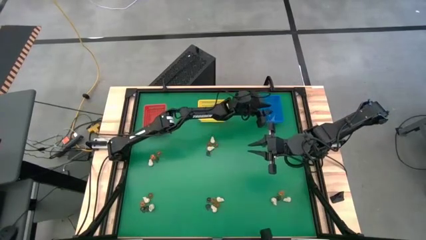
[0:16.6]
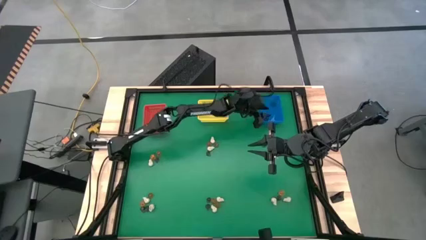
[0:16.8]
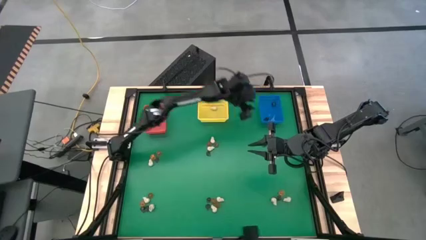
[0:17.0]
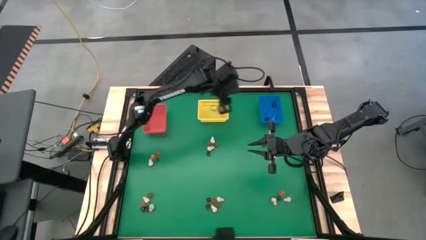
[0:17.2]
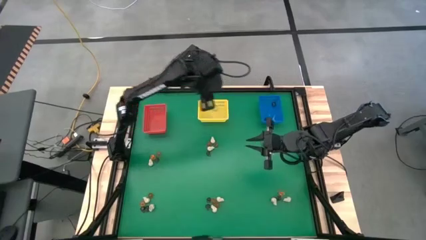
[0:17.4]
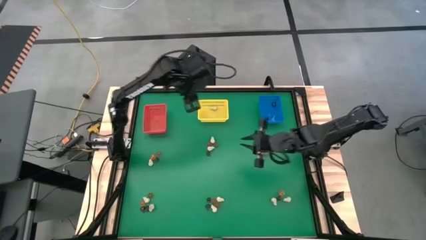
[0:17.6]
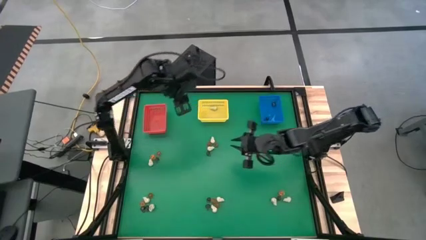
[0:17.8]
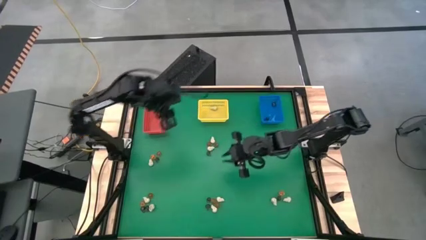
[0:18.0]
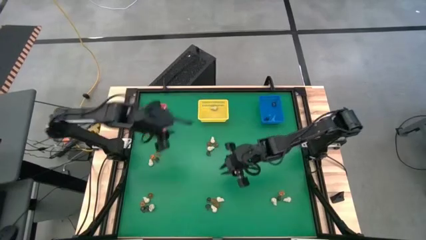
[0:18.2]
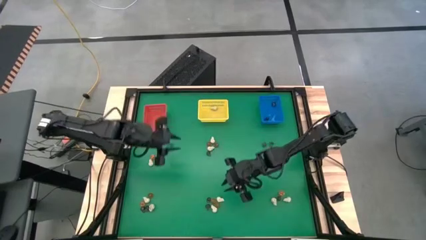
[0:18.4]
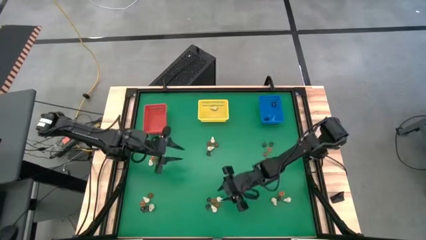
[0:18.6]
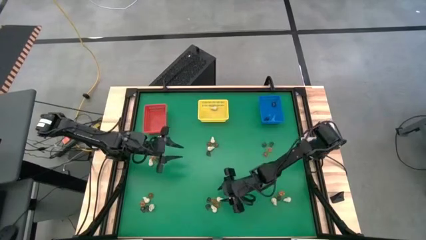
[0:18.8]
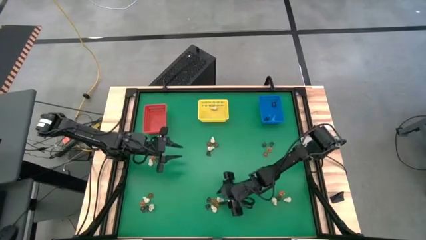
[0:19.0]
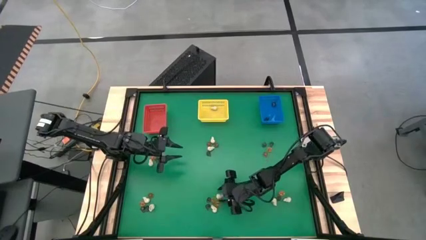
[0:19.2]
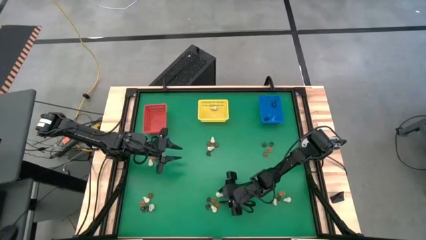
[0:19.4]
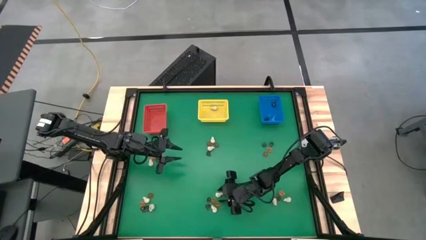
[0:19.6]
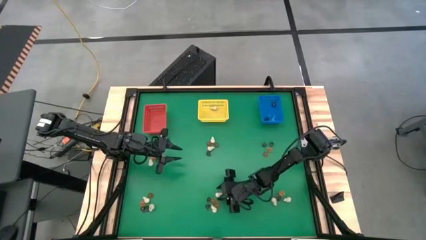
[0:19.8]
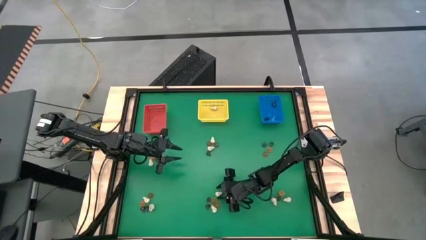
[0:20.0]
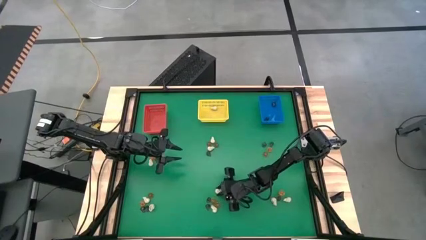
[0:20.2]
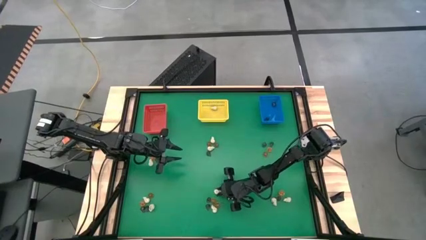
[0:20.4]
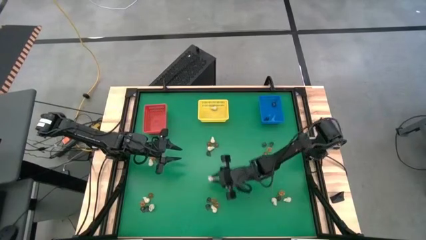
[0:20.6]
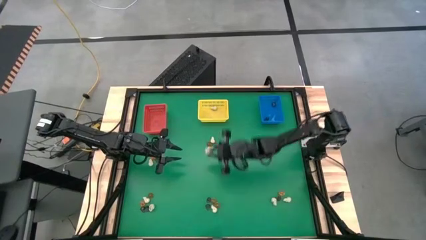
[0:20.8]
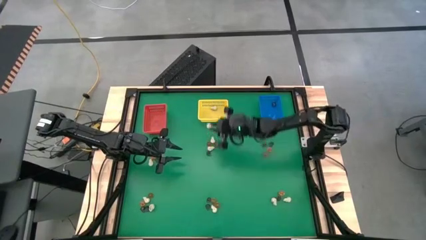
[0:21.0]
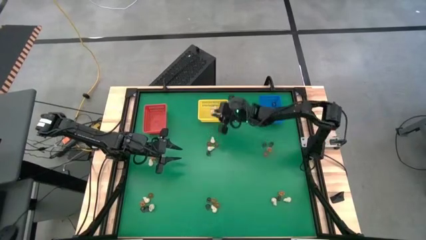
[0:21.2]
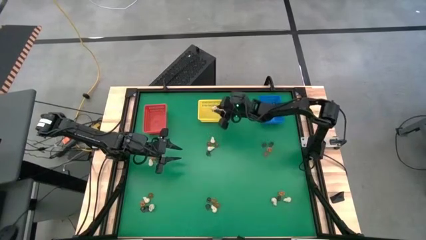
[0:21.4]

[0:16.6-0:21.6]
Task: Sort Halloween decoration
Put the white skull toy into the yellow bin

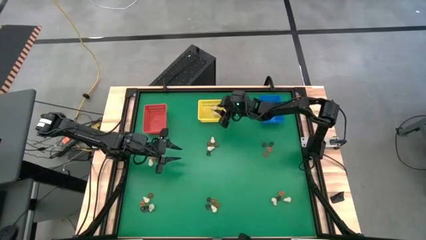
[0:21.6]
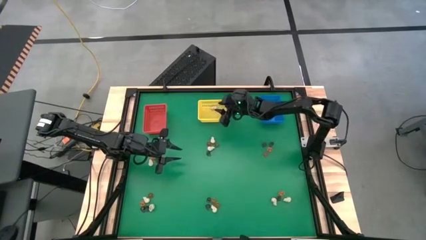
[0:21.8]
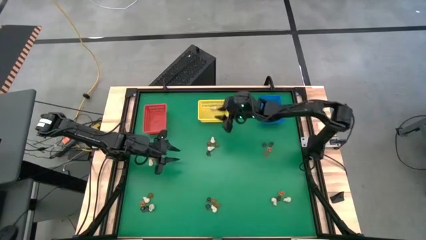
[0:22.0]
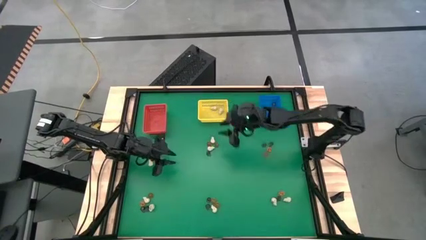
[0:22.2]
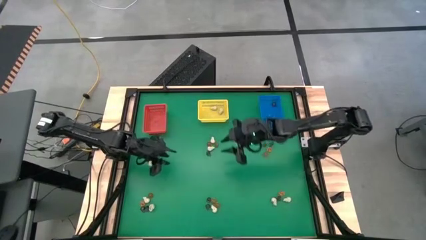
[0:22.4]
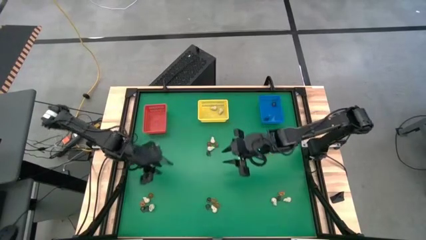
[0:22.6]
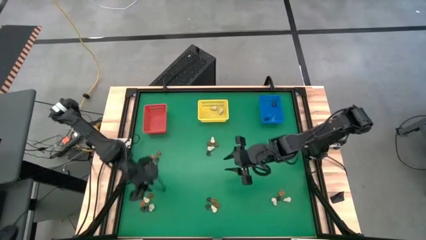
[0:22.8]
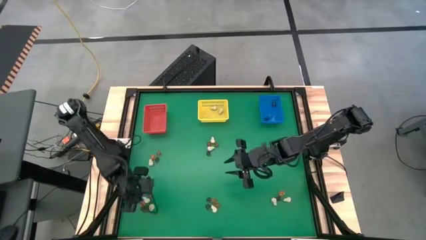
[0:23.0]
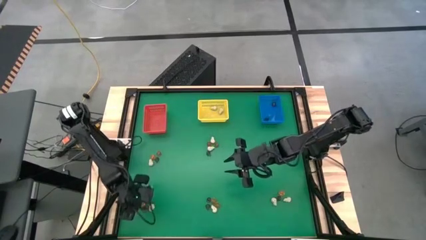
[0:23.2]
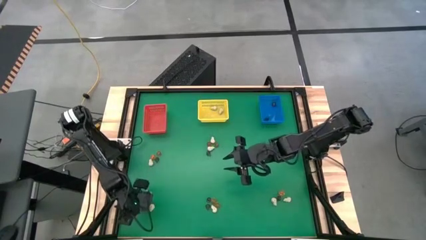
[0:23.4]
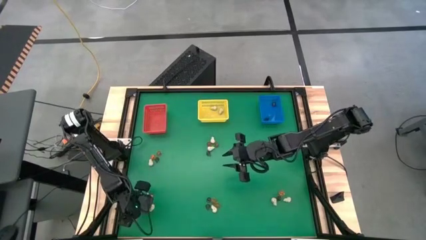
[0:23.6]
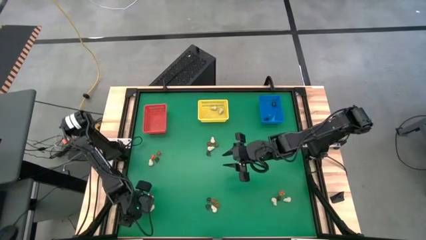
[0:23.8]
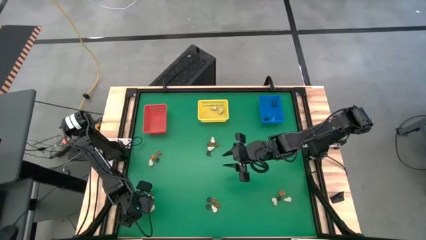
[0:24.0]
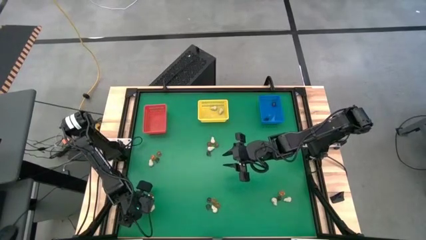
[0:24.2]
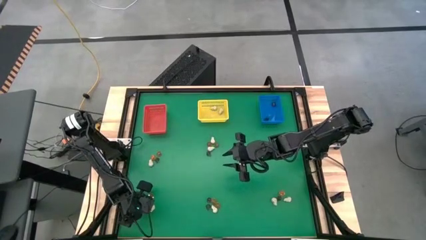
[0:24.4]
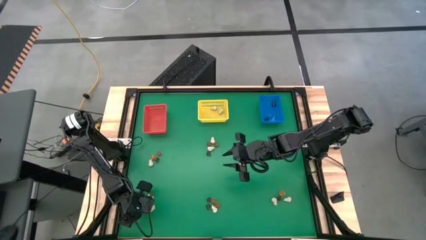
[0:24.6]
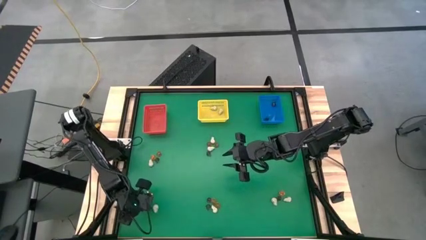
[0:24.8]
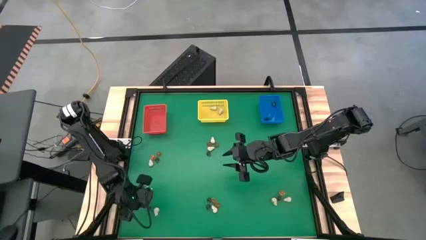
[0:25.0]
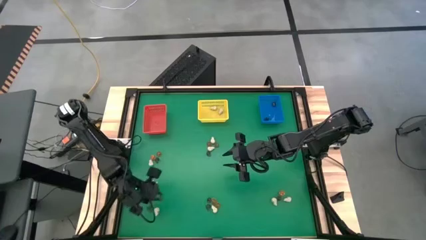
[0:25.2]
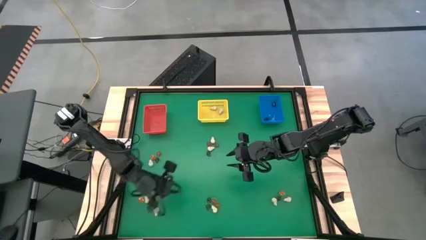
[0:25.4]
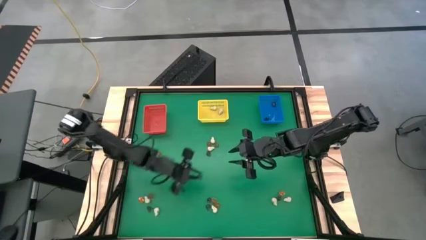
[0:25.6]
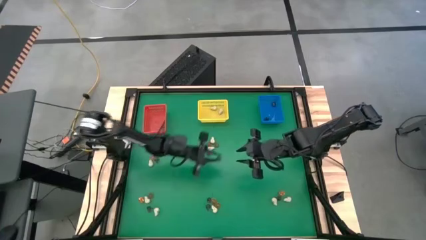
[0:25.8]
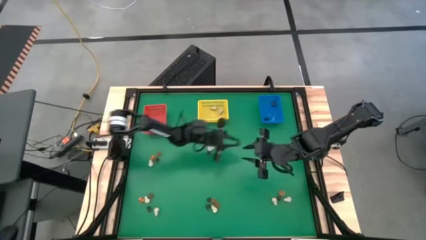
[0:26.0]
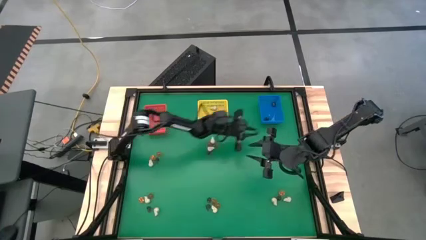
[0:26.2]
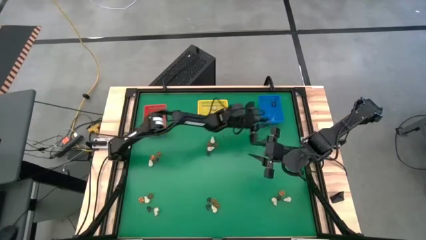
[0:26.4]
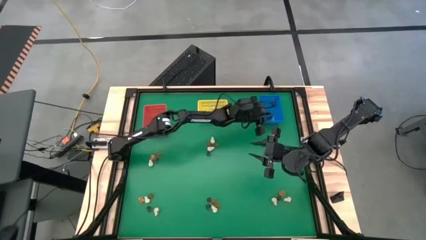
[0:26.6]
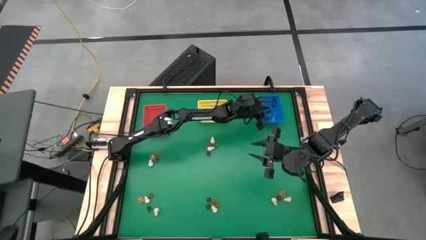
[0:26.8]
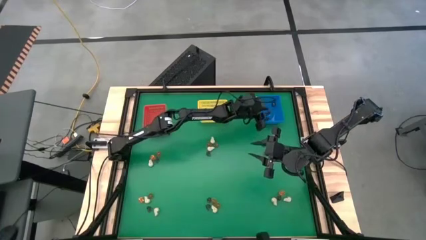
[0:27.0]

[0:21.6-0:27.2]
Put the purple skull toy into the blue bin

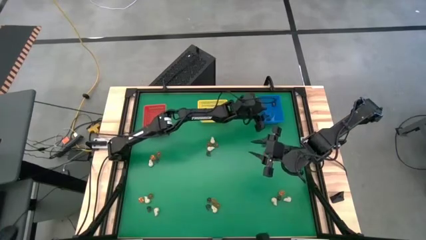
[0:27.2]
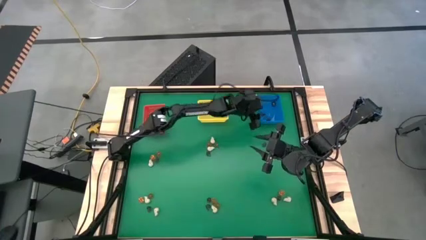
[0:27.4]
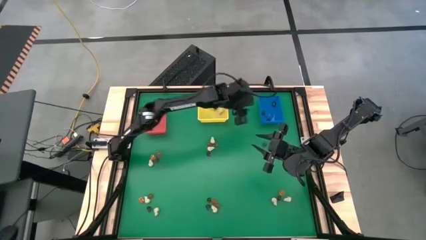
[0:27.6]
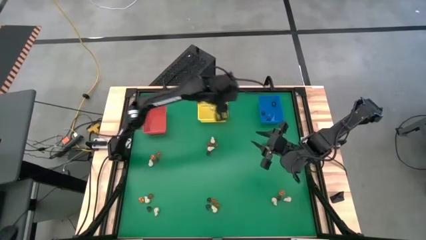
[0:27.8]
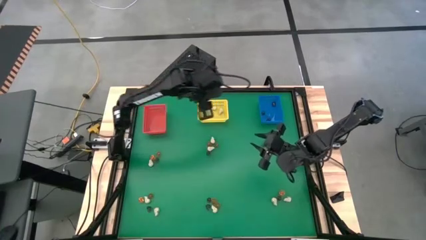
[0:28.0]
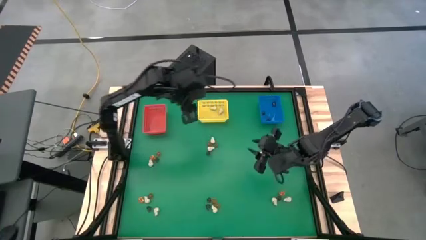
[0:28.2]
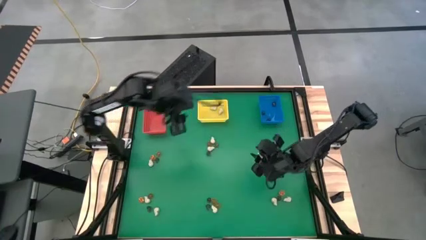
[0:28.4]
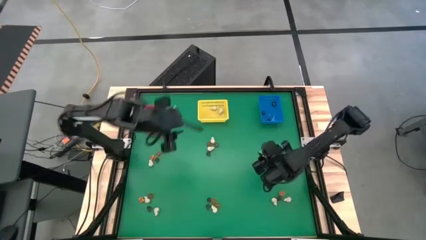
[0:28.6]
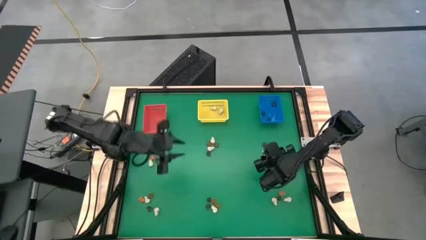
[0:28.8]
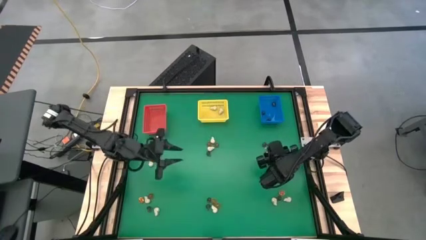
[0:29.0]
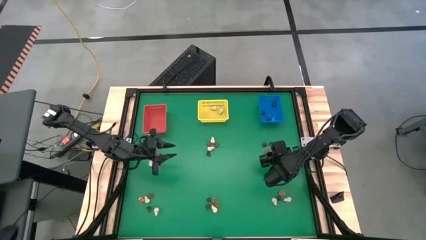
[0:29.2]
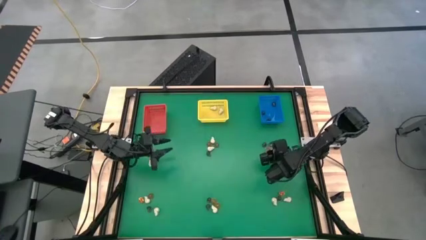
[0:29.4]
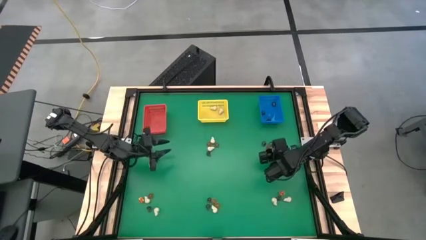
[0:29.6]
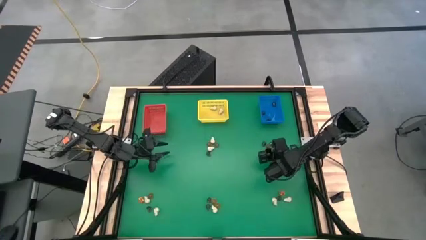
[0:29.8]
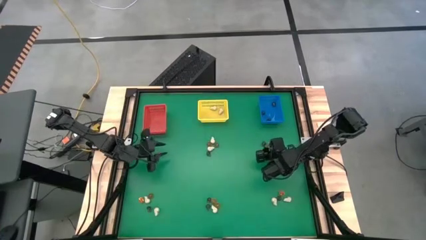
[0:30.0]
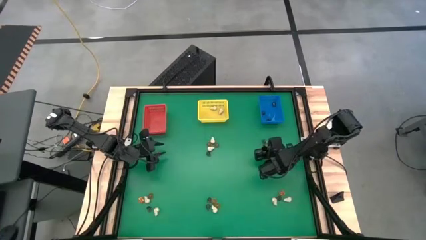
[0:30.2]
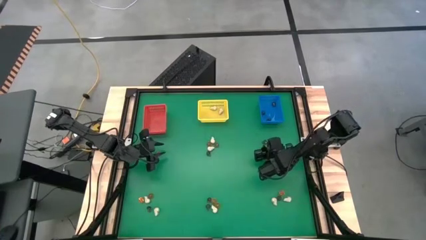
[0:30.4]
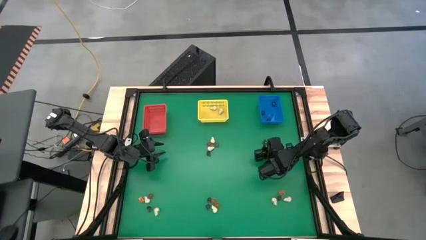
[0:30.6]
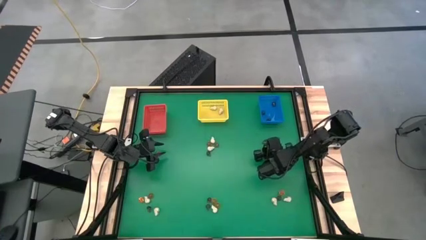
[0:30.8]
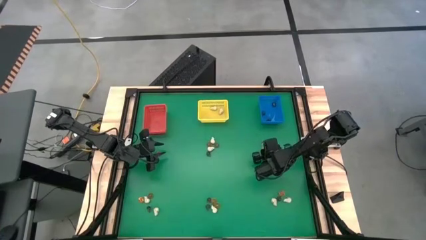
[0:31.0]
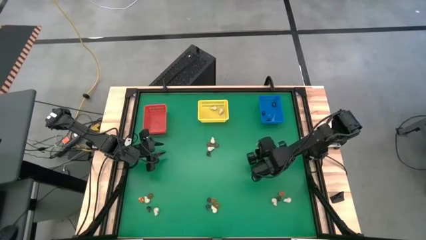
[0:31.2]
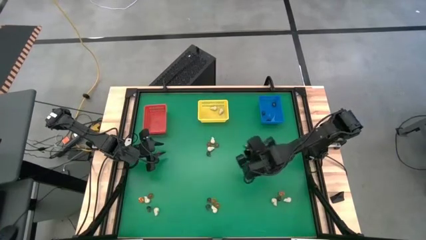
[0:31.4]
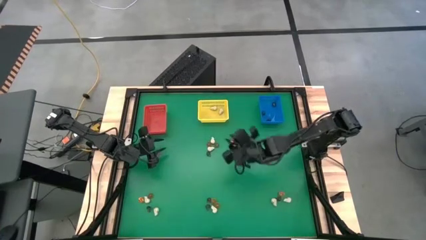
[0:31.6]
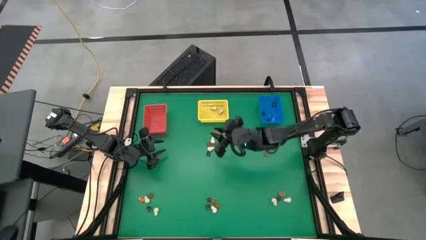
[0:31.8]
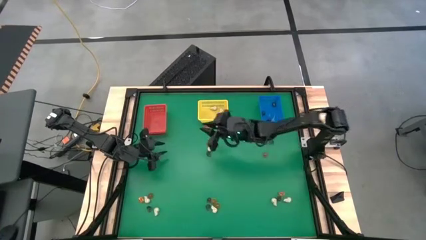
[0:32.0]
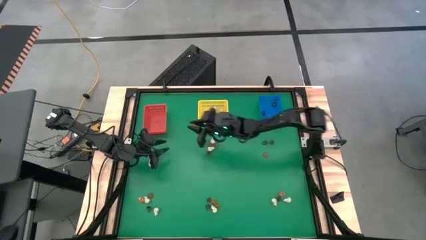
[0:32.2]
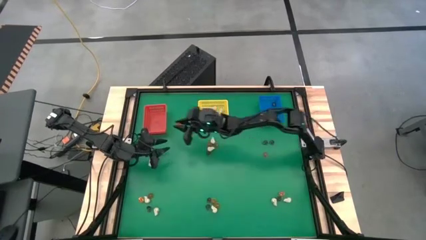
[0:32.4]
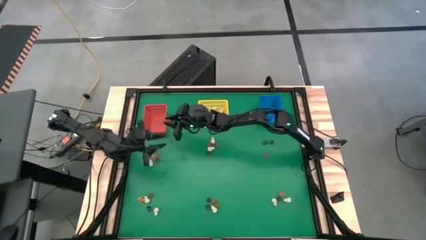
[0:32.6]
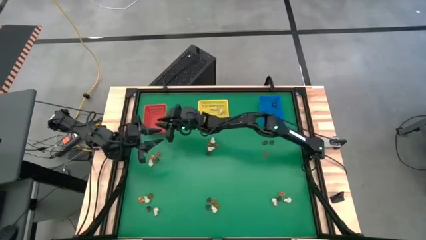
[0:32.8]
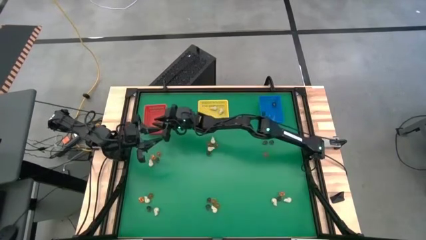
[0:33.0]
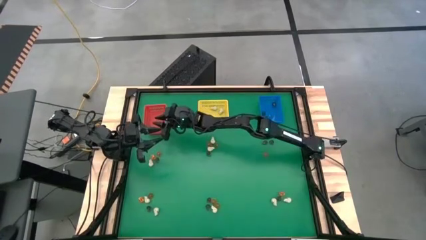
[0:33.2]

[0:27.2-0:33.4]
Put the orange flower toy into the red bin
